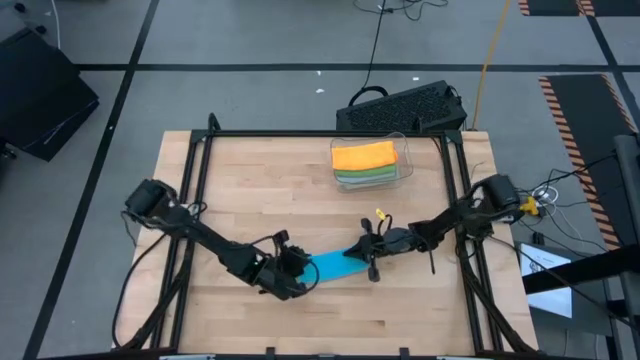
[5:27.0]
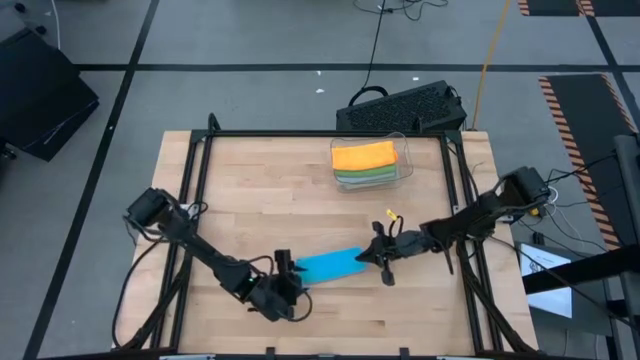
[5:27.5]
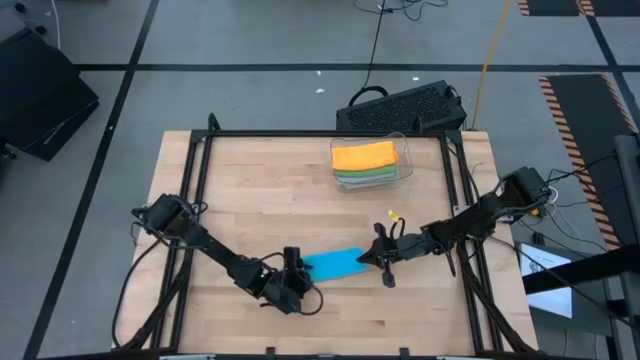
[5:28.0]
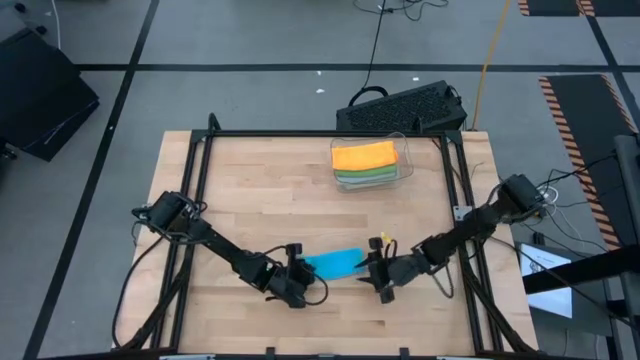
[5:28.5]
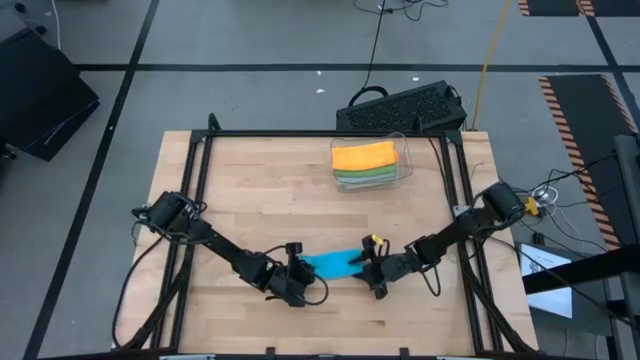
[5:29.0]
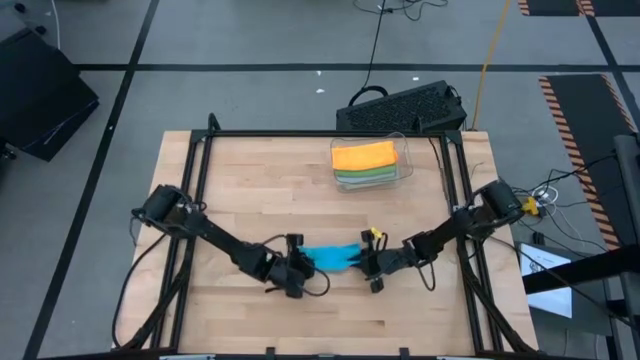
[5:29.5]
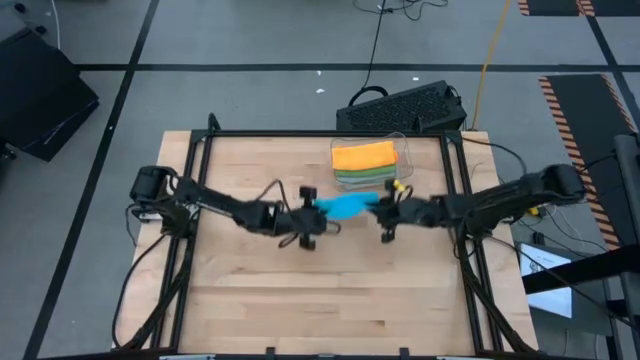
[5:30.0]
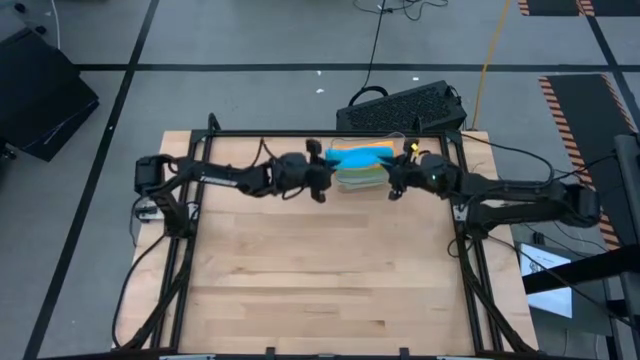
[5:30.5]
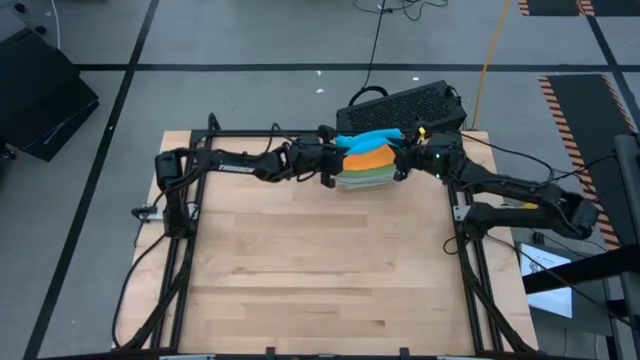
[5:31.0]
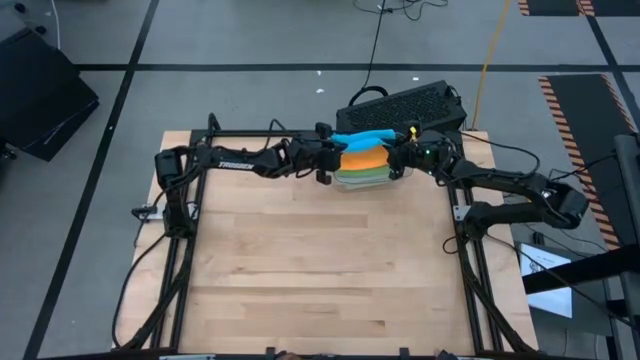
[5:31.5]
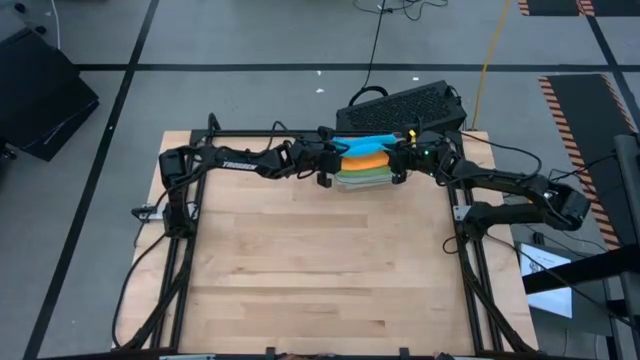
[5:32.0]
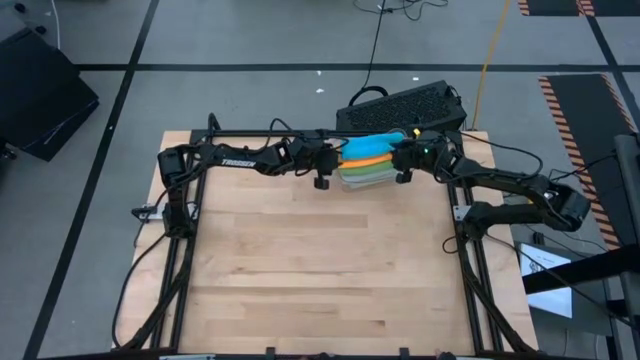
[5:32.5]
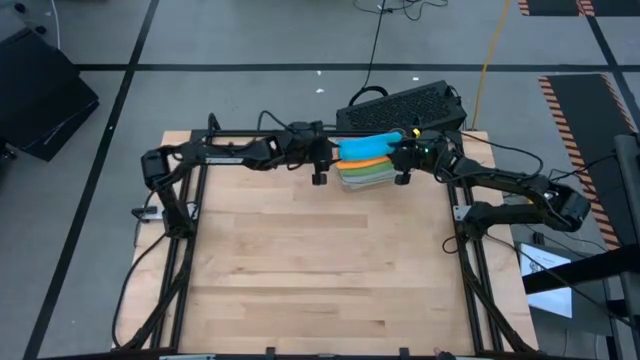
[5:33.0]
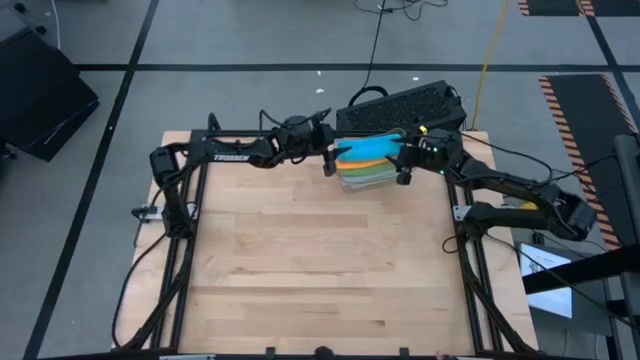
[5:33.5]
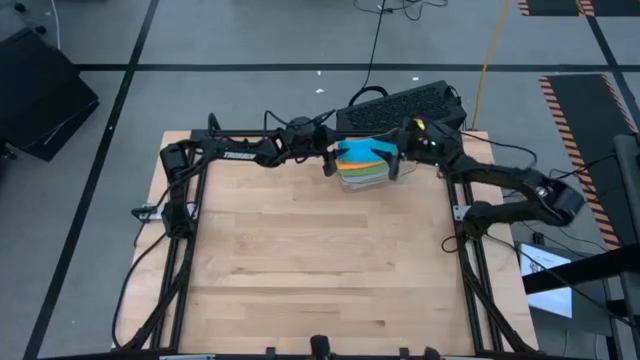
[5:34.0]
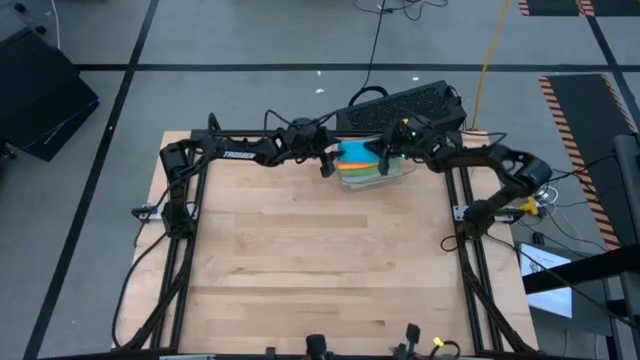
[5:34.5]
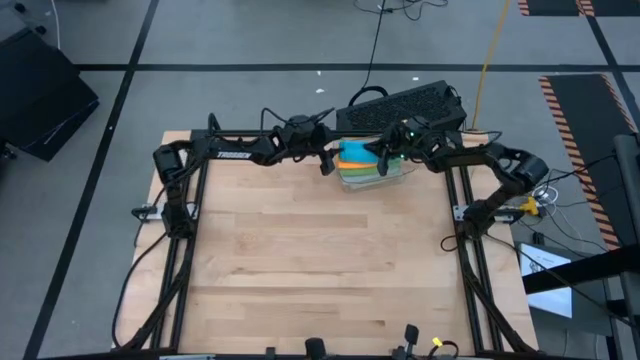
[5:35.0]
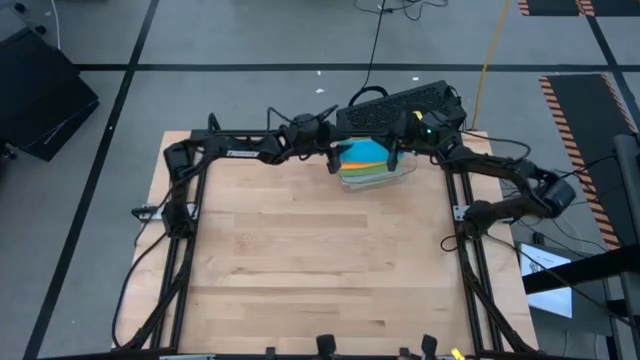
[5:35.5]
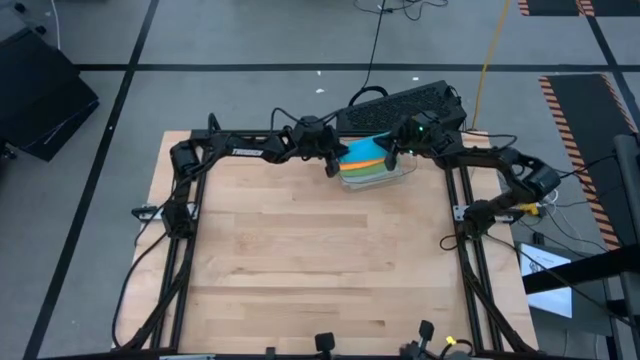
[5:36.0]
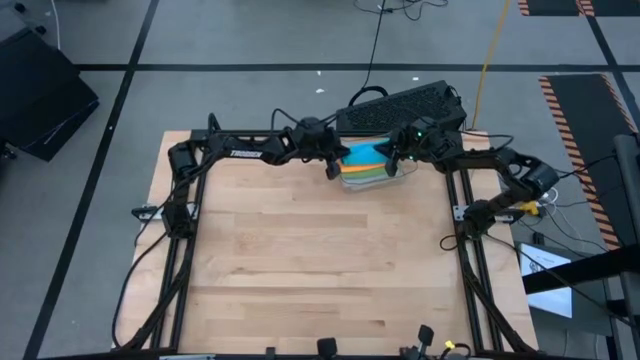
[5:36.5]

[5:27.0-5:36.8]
Task: Fold microfiber towels
Put the folded blue microfiber towel into the transparent bin

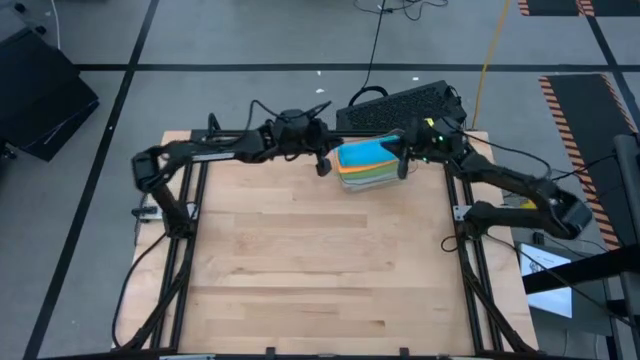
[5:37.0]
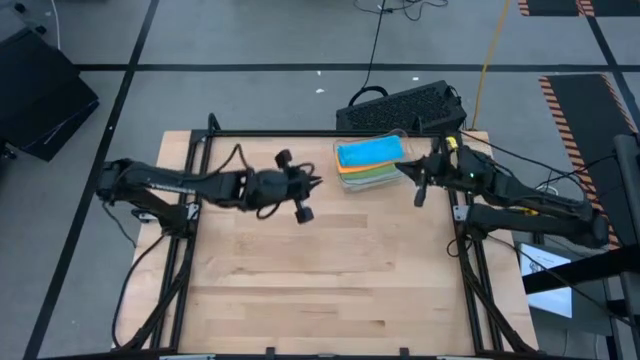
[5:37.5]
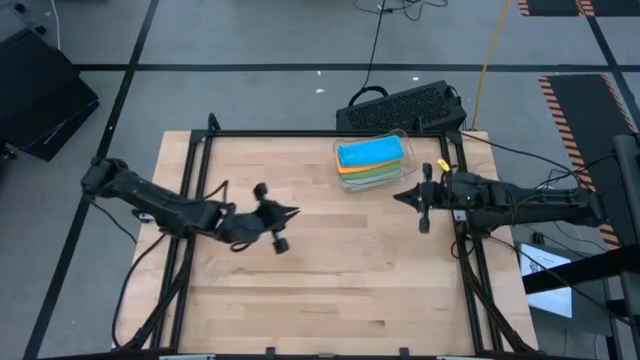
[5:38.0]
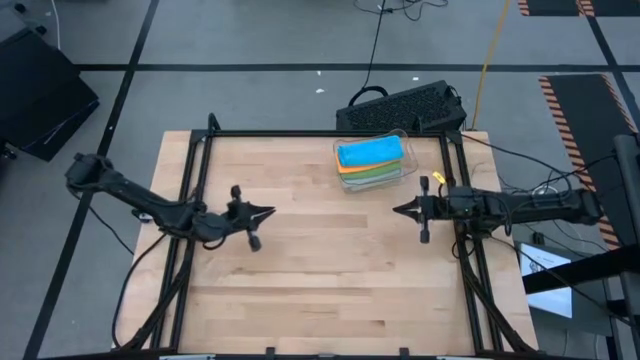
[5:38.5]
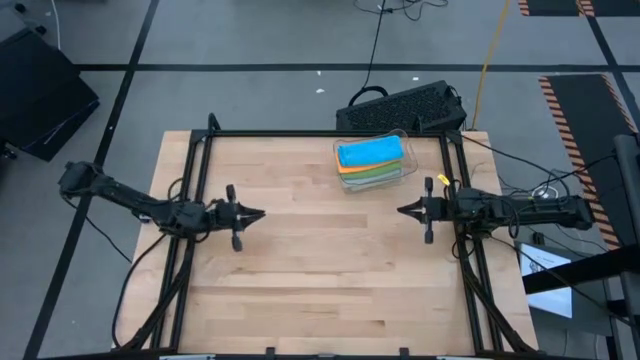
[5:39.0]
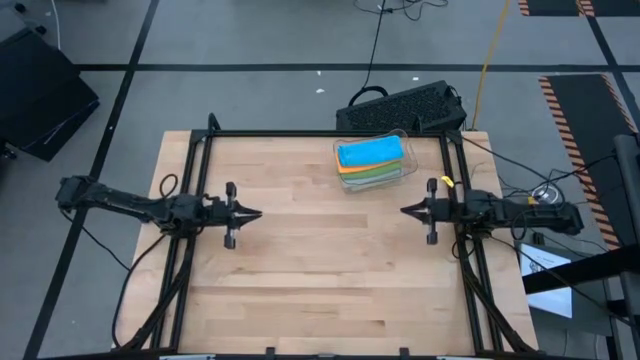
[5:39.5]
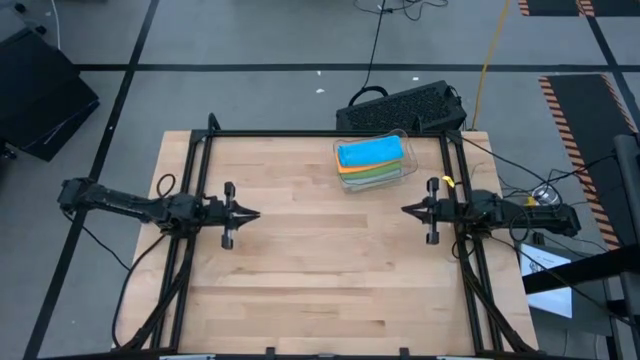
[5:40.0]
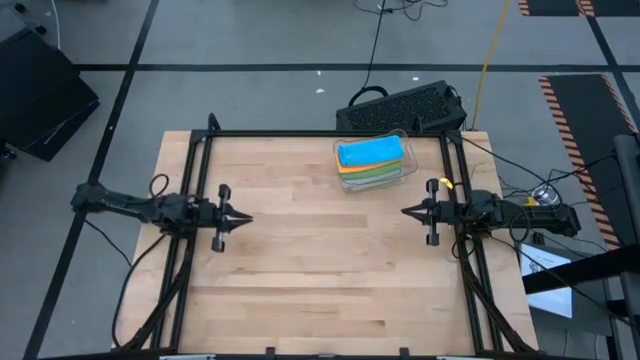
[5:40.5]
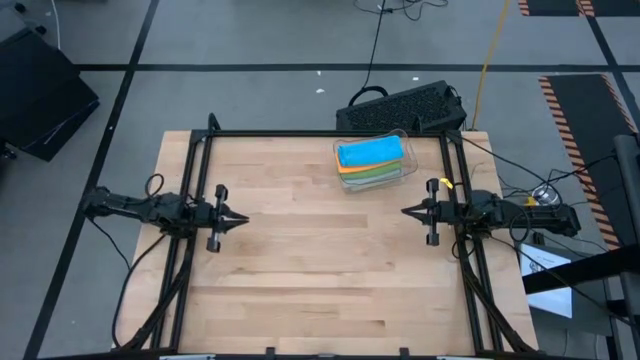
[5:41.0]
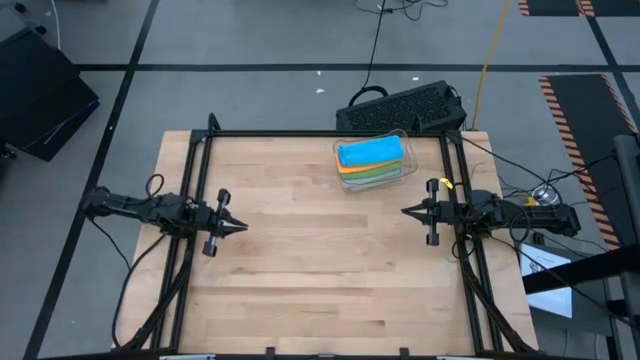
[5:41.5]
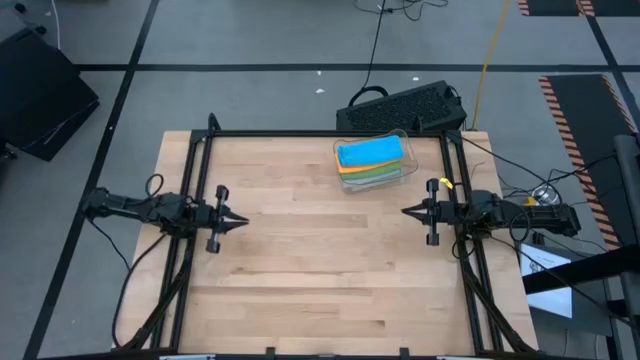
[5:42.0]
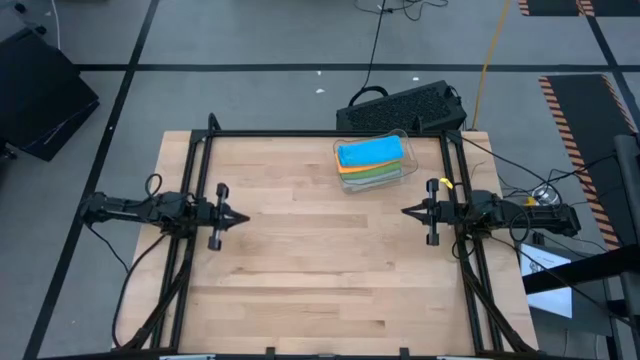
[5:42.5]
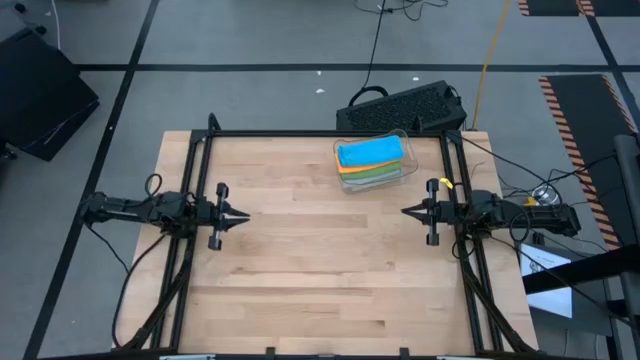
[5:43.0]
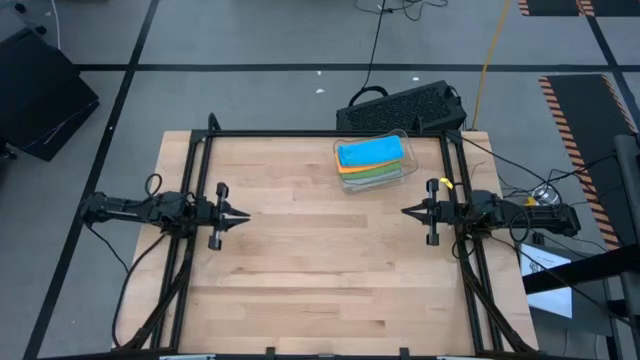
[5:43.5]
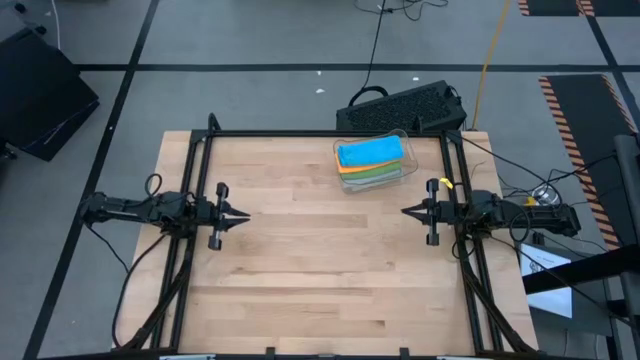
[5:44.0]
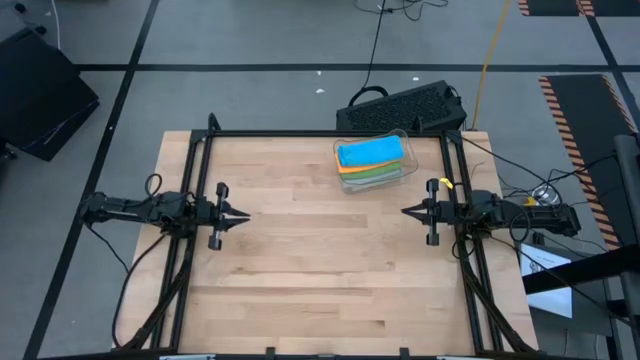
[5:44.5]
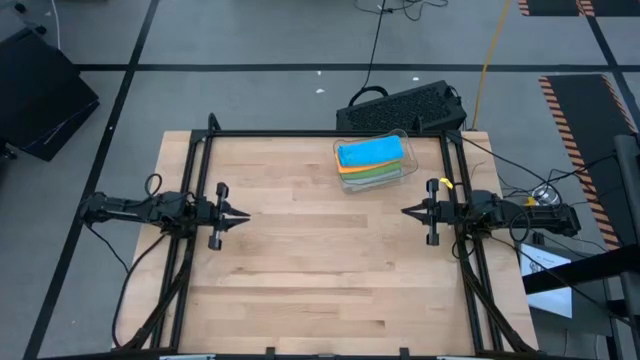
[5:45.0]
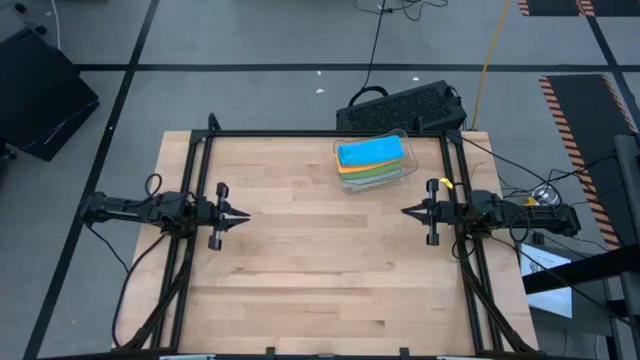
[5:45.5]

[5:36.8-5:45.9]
Return to Home Position
